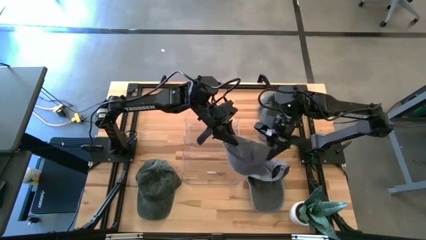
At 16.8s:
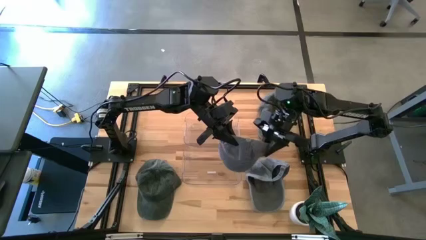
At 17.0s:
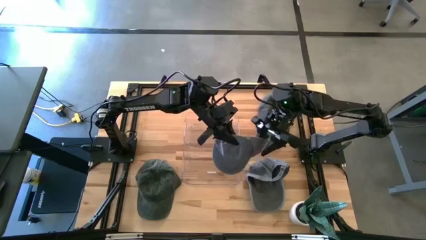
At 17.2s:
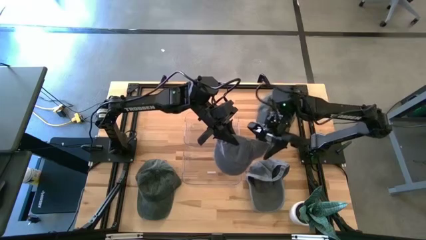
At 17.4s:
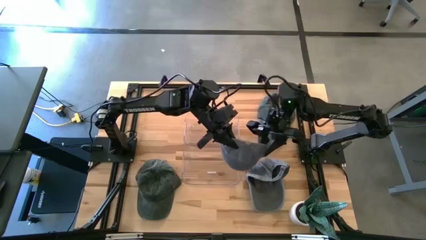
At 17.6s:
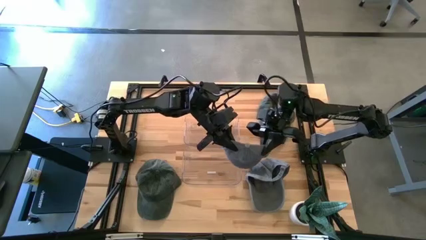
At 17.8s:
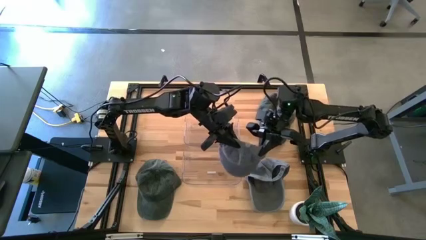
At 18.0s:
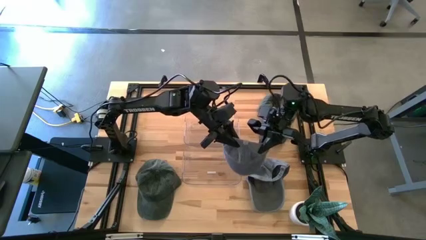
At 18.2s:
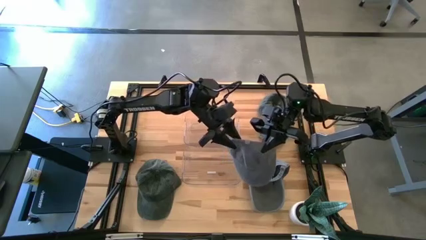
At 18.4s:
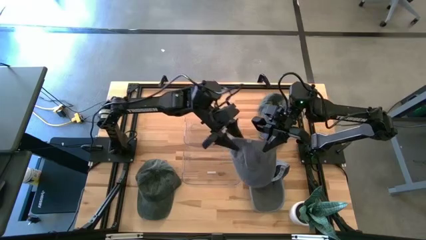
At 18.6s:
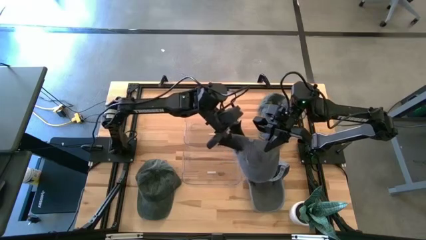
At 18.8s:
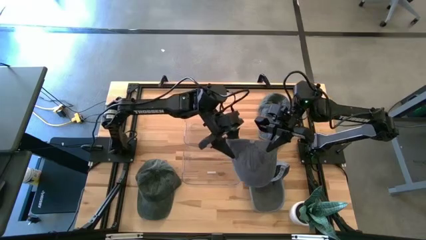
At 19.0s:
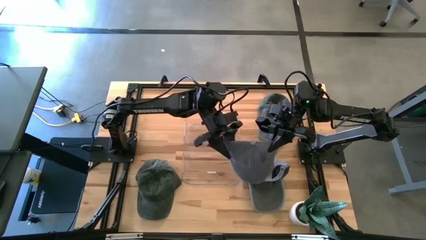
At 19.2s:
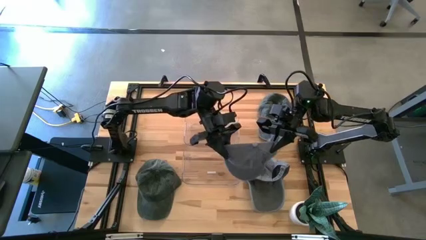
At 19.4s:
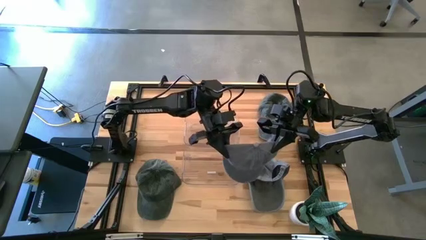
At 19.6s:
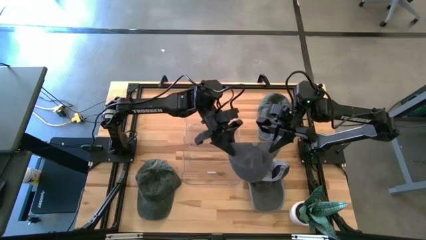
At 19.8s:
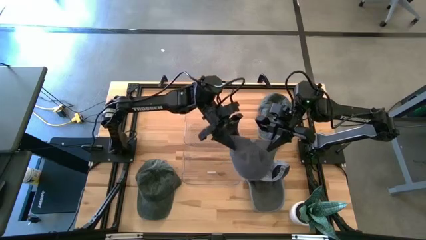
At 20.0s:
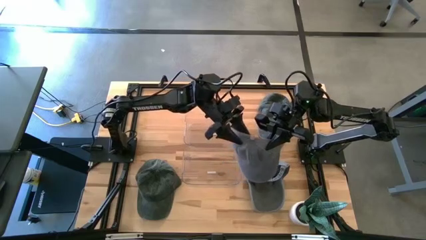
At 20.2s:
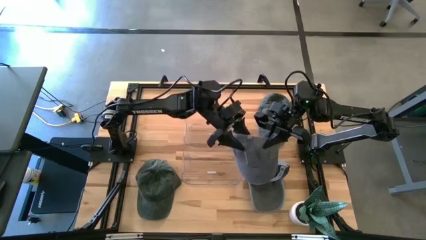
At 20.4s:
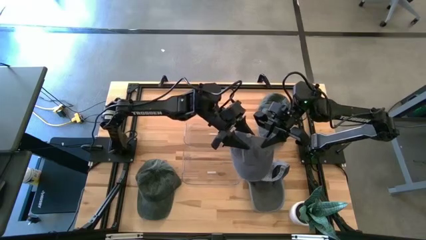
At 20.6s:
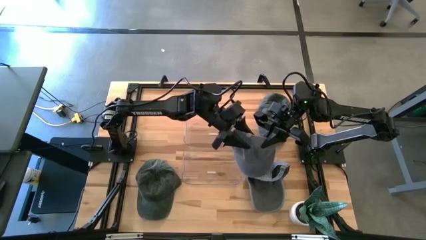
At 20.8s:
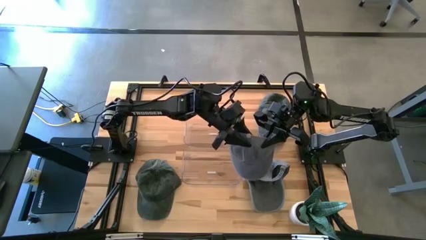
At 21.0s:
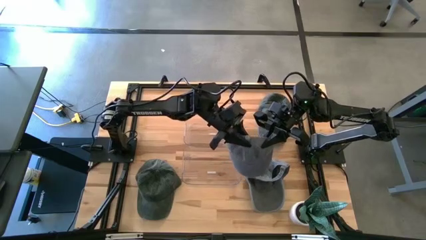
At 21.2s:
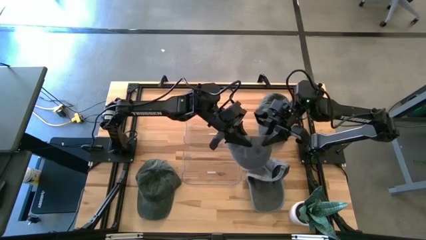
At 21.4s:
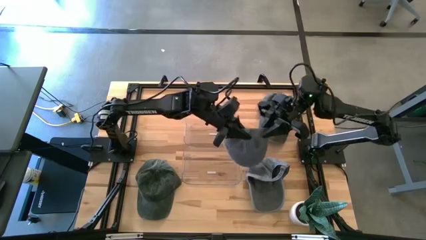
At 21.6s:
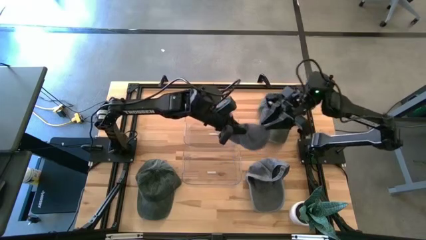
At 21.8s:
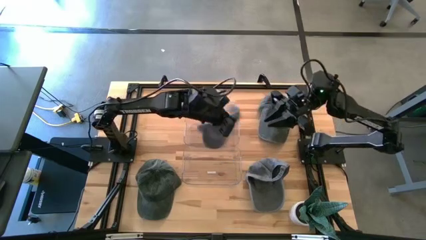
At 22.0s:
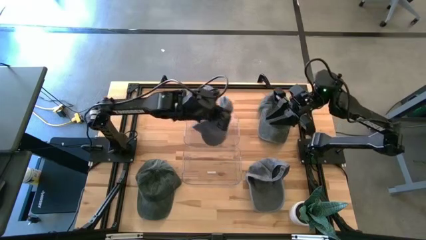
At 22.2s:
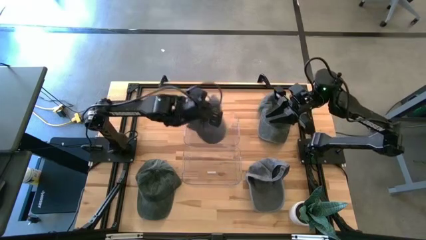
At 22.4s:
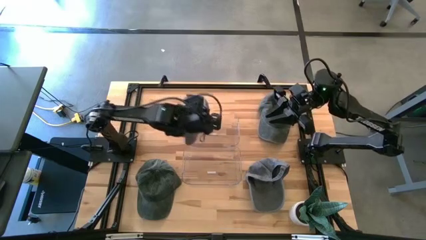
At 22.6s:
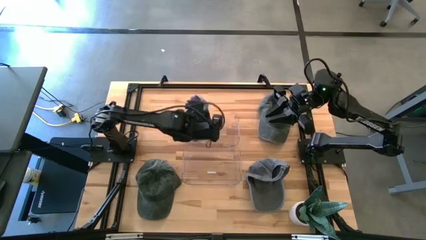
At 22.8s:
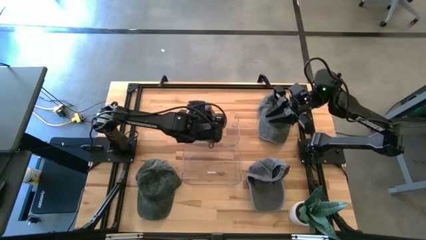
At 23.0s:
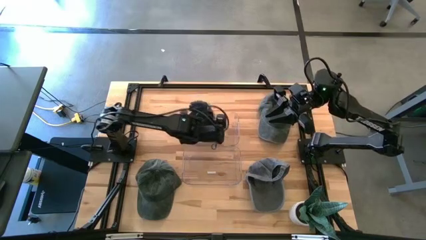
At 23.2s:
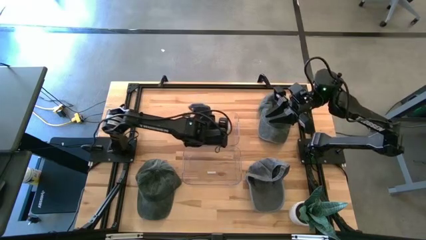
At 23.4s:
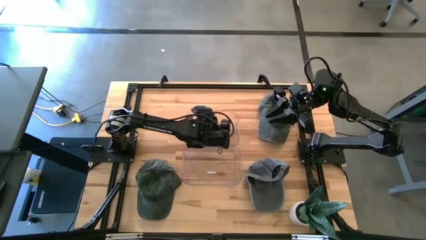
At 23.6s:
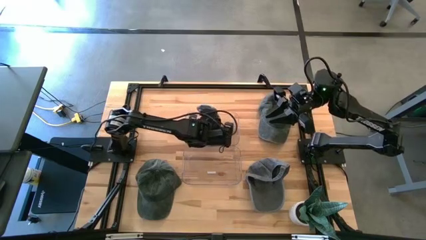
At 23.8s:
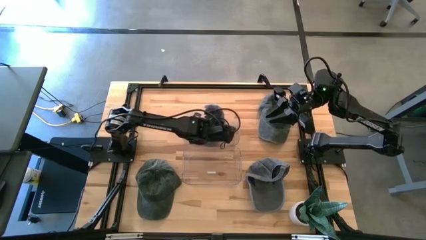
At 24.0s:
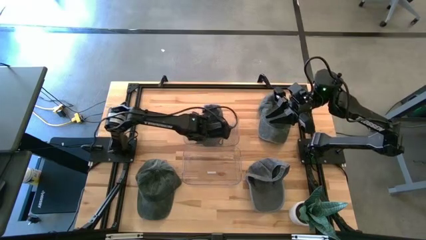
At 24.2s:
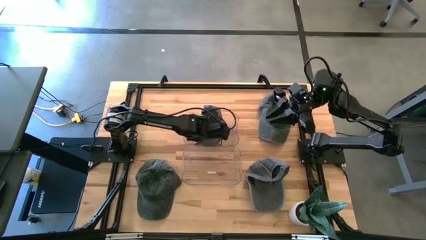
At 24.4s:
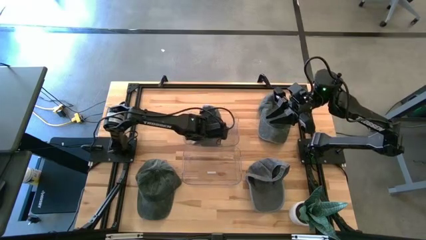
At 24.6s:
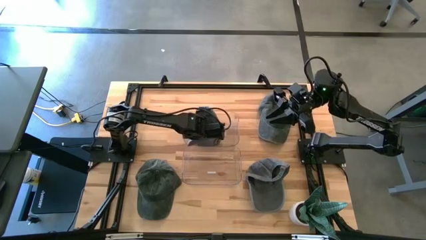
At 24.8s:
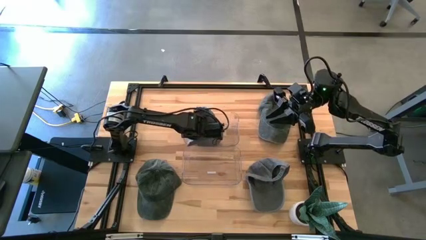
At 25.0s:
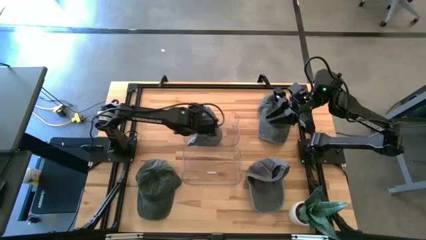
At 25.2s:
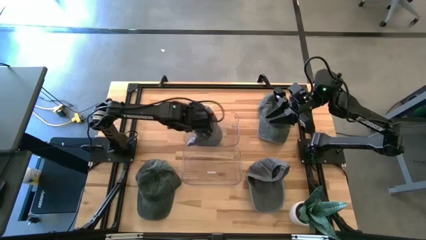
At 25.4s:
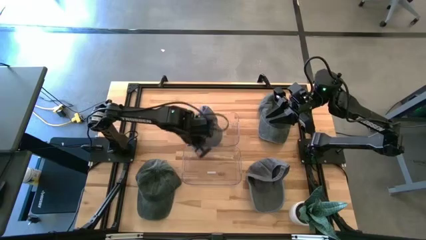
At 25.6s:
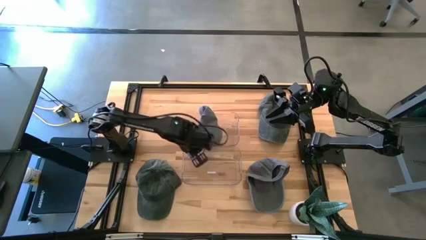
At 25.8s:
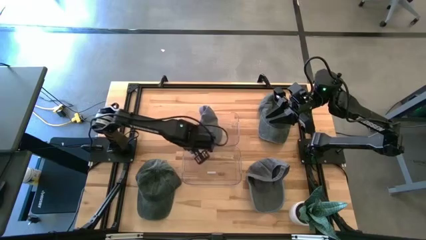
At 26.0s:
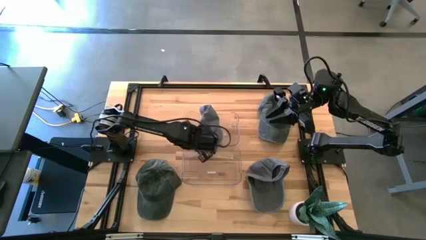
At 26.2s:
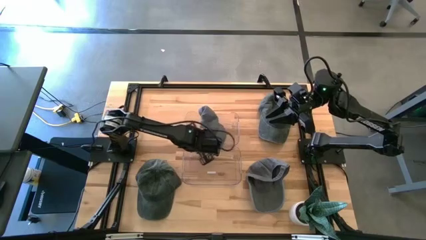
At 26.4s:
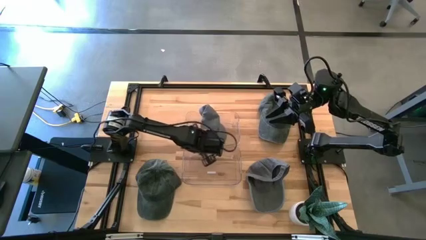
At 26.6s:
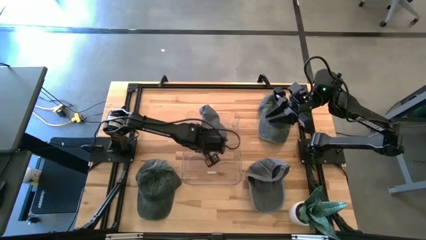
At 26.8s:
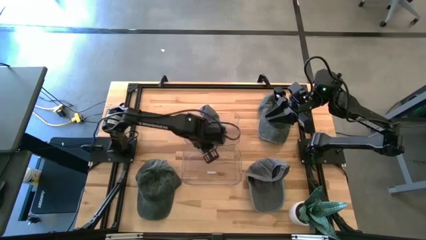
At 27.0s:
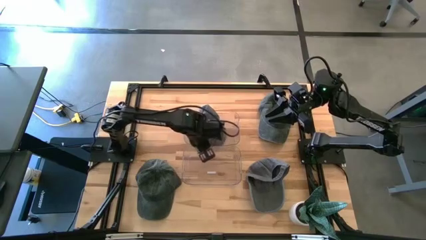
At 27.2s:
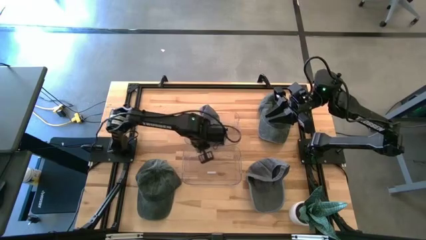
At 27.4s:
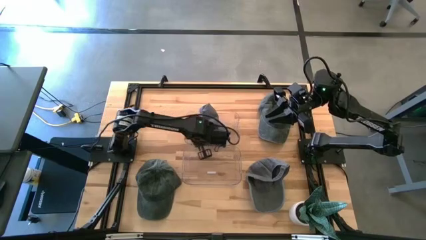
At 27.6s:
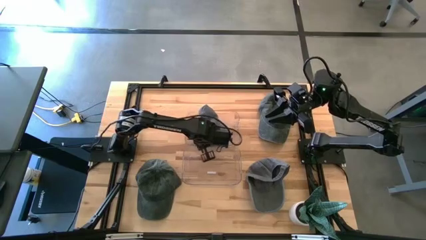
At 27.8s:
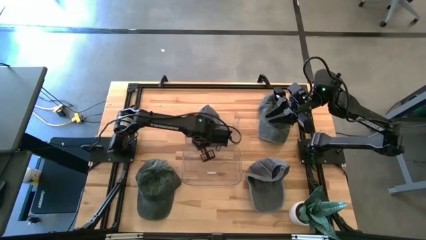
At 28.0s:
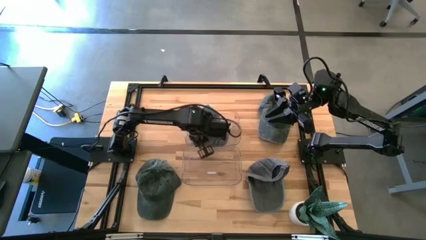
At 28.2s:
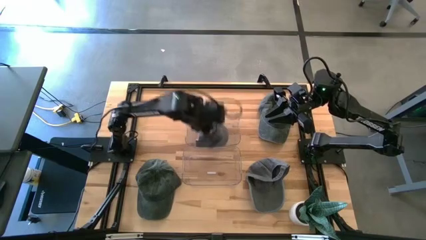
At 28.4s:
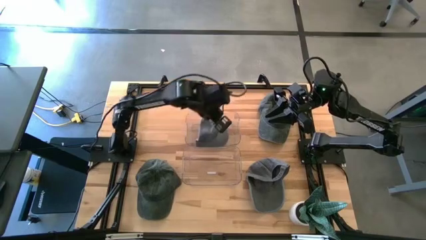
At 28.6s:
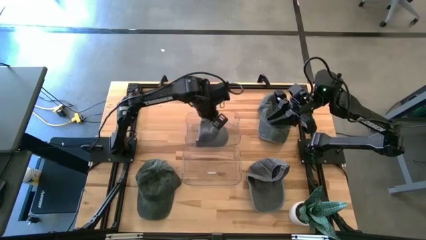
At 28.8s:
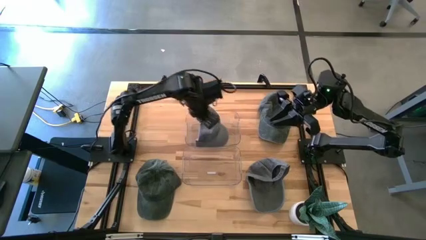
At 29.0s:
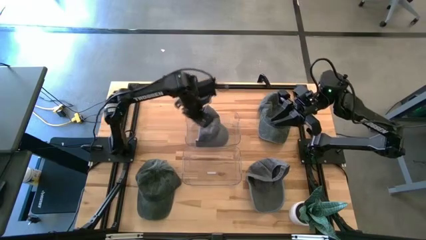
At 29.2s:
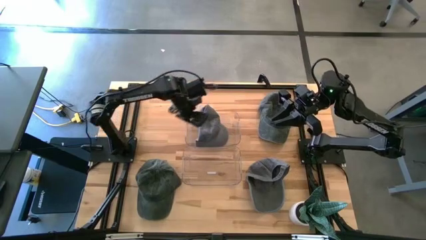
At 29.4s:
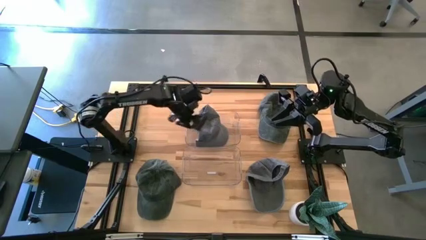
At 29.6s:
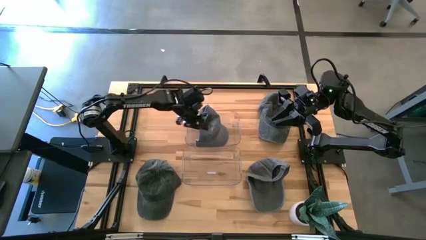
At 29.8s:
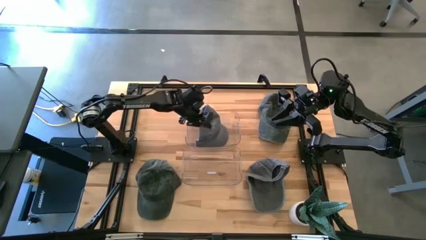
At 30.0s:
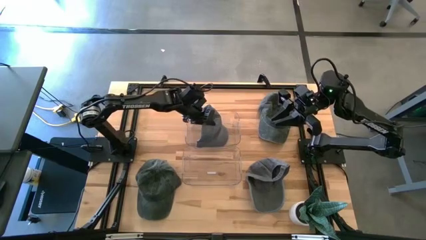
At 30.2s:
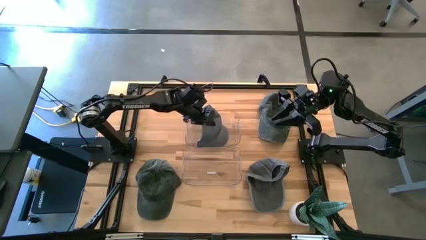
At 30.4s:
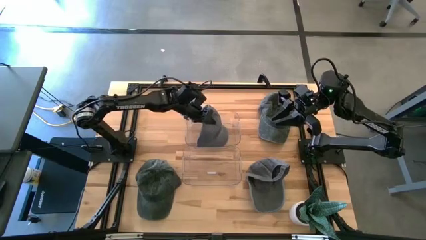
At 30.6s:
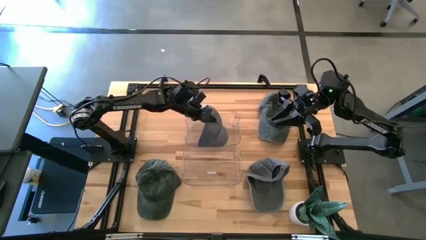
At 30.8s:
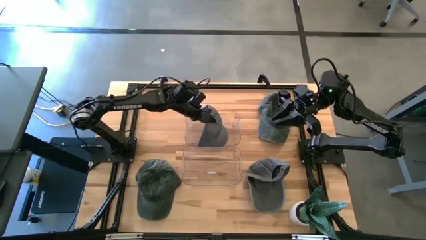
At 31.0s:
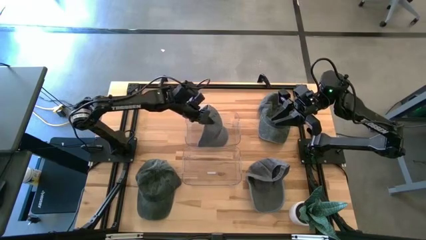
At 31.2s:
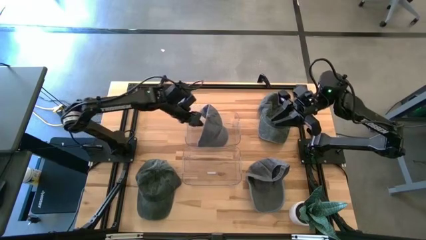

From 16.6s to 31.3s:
Task: Pick & Place hat
Put the top gray cap into the top transparent bin
